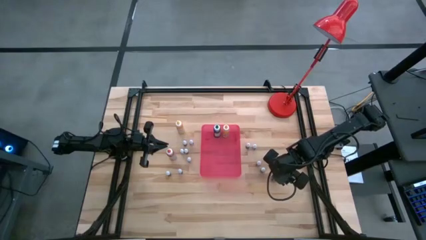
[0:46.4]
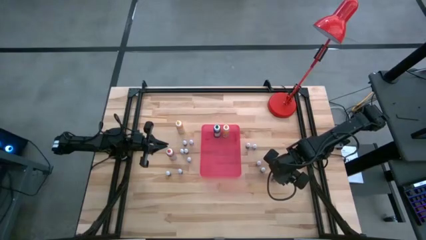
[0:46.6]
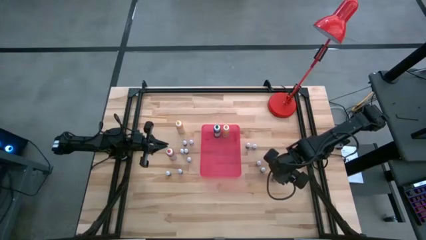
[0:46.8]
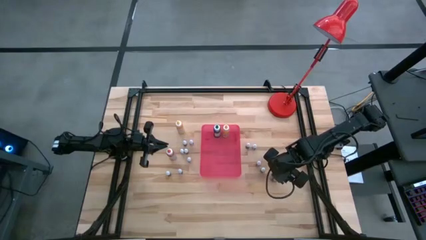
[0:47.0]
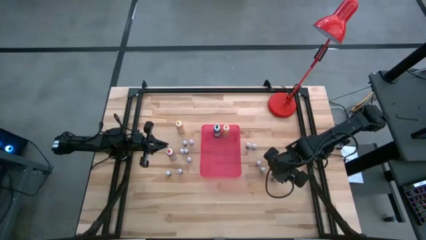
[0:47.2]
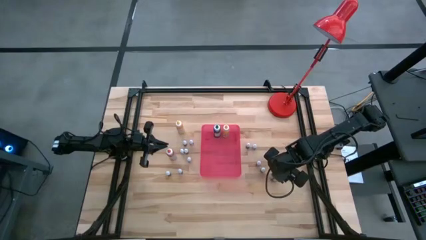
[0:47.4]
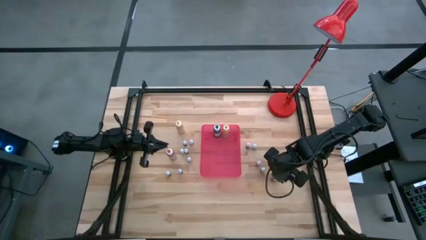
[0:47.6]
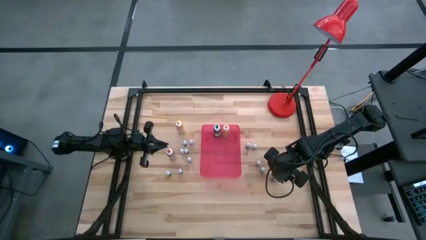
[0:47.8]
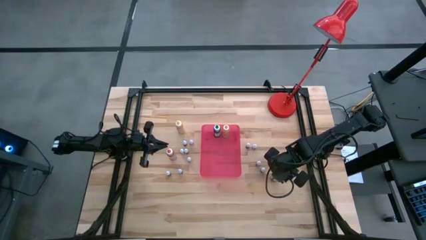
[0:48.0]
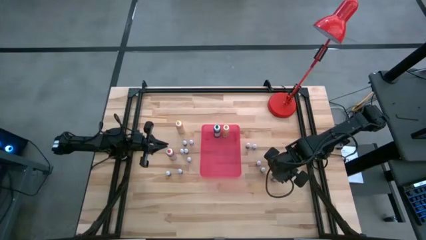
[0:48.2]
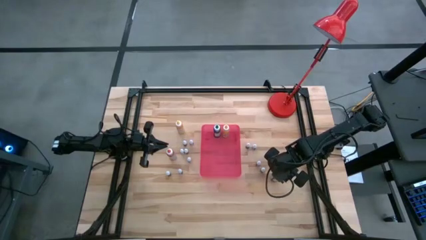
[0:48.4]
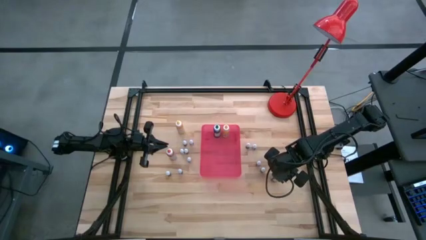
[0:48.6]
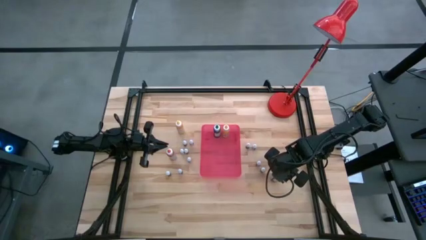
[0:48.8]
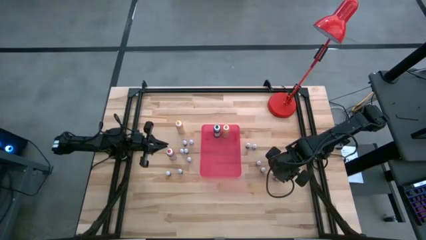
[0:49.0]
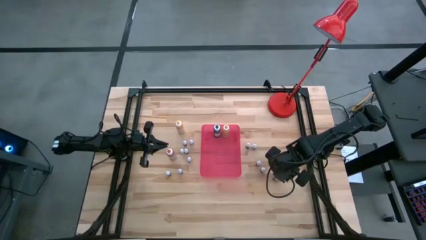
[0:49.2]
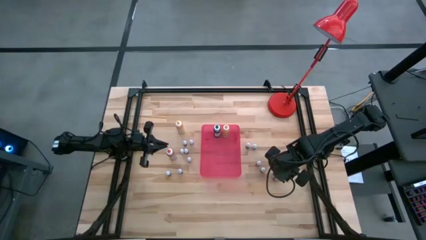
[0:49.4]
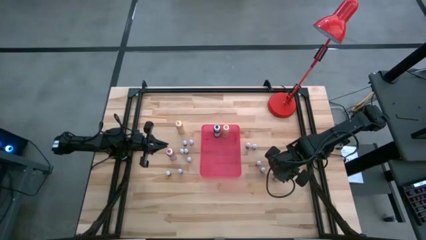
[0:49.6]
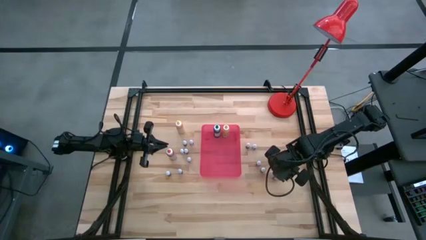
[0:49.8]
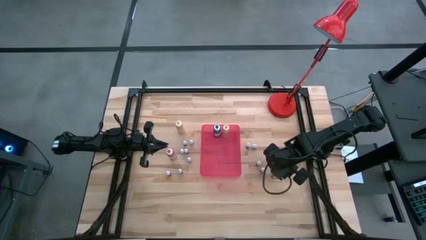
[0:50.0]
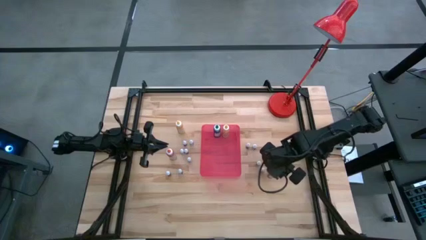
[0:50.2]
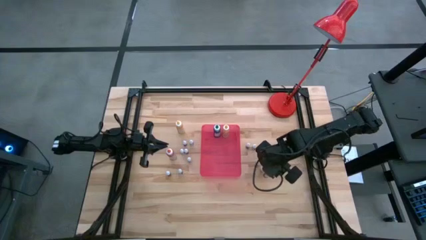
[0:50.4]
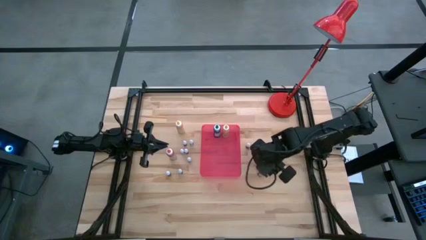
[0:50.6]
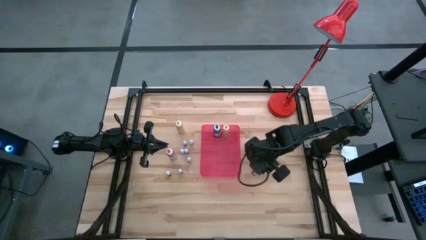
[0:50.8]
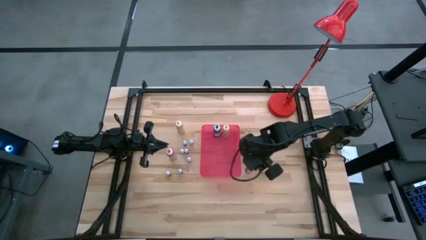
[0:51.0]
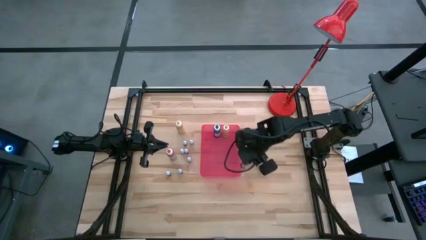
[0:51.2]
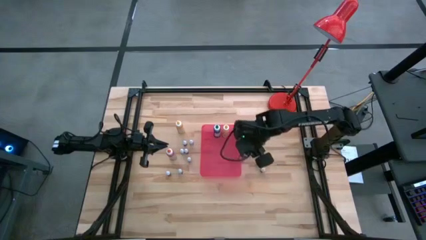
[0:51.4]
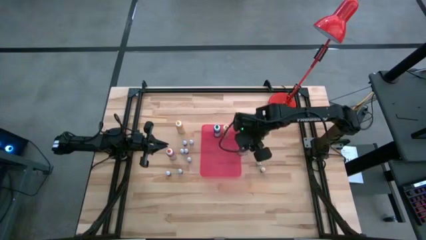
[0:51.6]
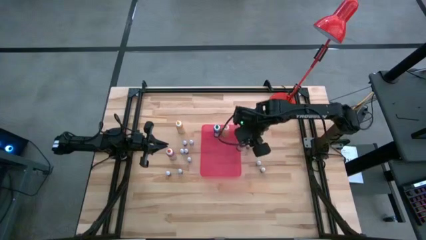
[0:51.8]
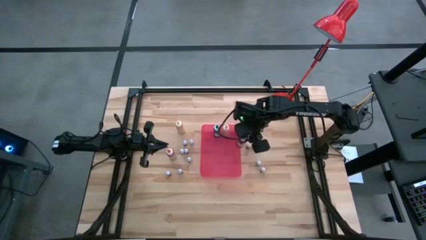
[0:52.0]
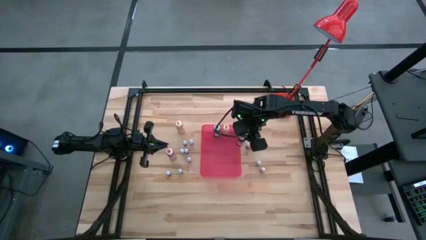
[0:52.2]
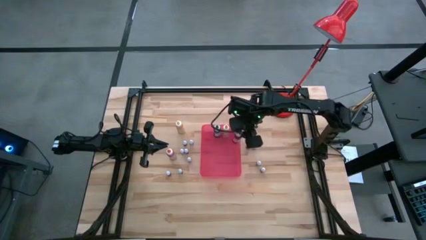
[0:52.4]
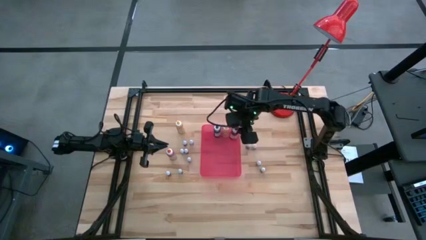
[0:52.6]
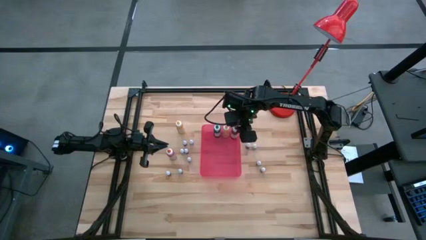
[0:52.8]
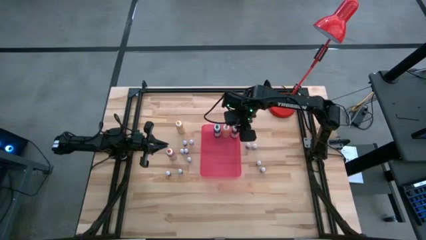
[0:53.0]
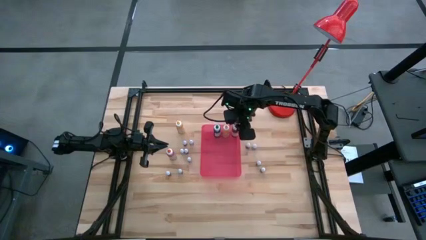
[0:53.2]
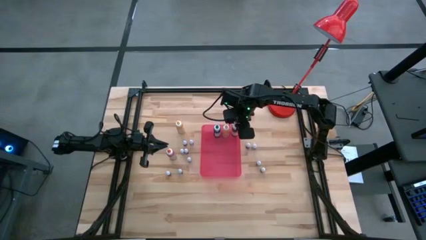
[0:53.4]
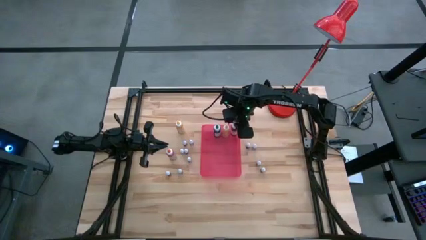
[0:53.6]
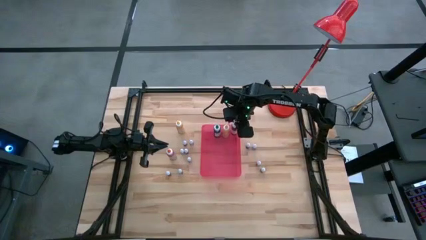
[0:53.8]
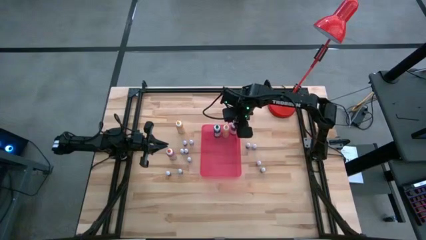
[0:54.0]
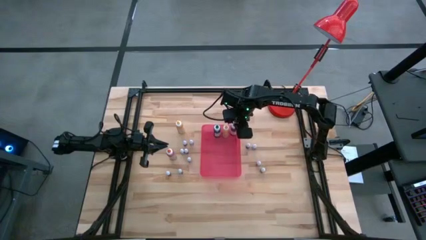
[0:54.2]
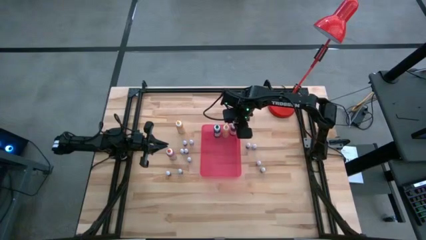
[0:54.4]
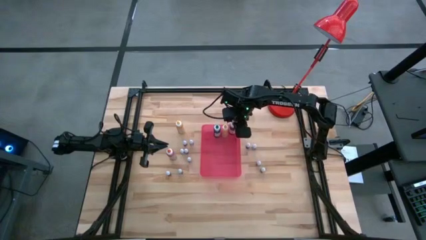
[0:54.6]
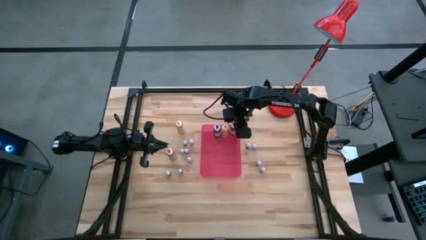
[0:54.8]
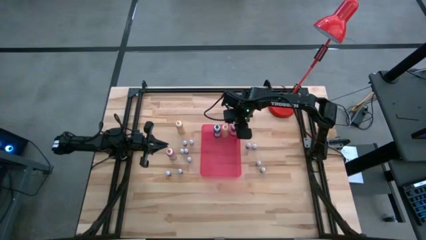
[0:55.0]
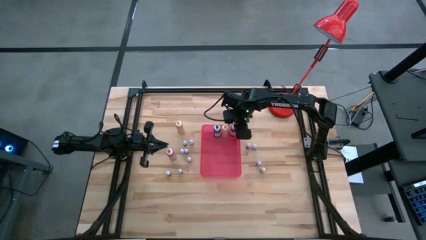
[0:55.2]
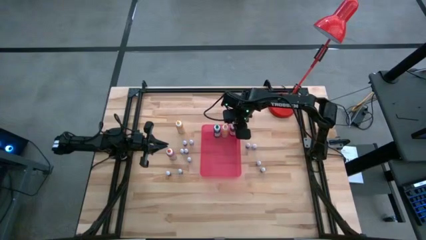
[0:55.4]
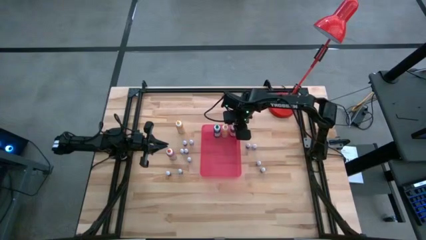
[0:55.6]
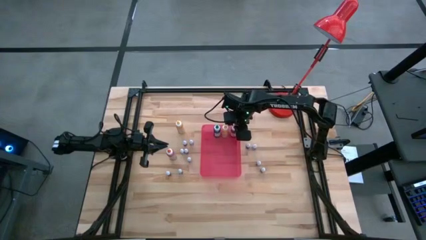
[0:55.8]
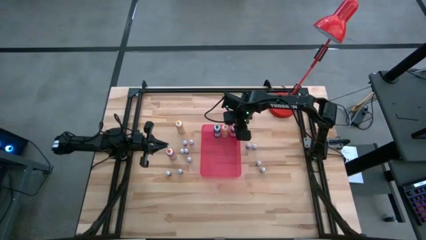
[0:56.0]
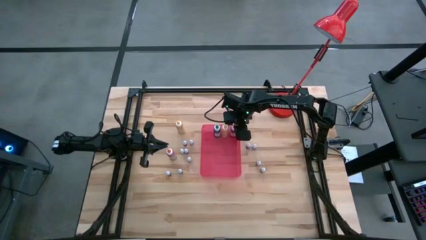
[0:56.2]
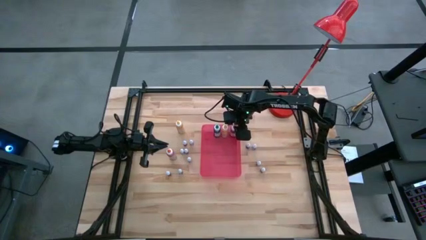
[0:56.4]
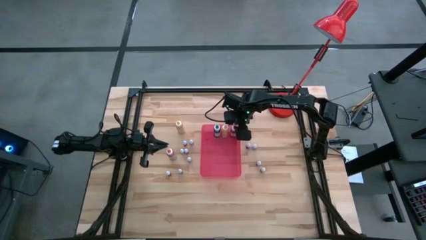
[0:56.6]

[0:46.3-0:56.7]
Task: Pick & Place food coloring
Put the large red food coloring bottle into the red bin

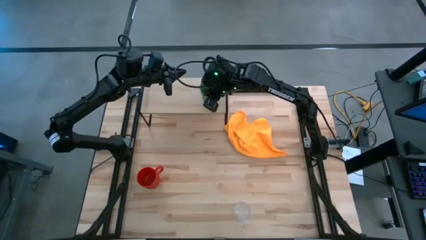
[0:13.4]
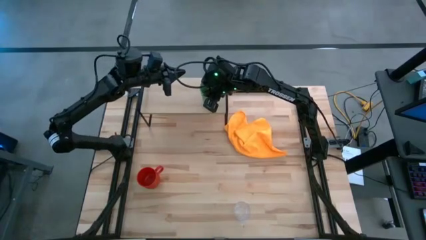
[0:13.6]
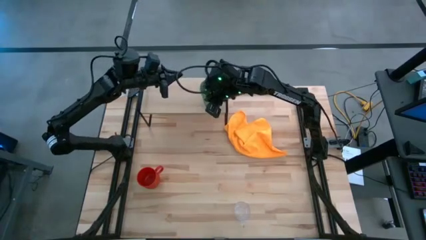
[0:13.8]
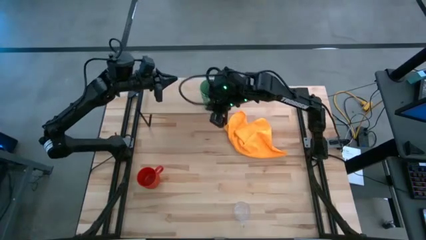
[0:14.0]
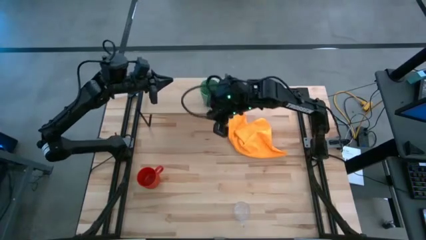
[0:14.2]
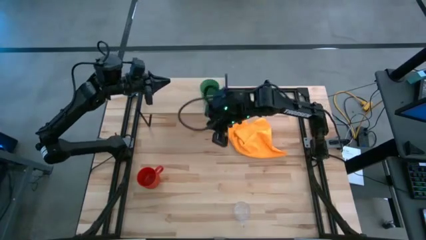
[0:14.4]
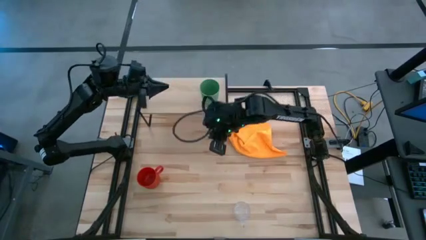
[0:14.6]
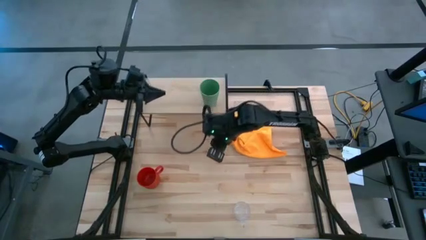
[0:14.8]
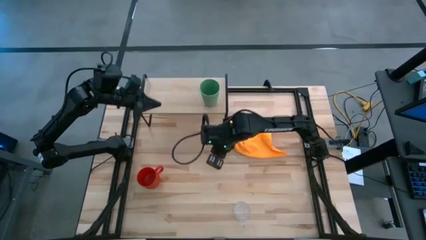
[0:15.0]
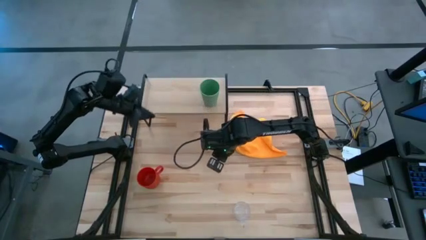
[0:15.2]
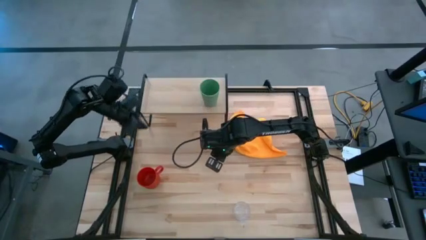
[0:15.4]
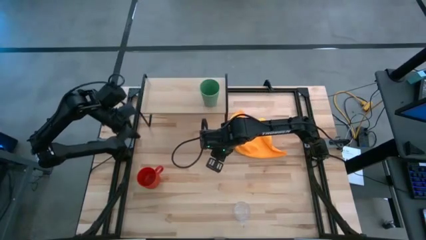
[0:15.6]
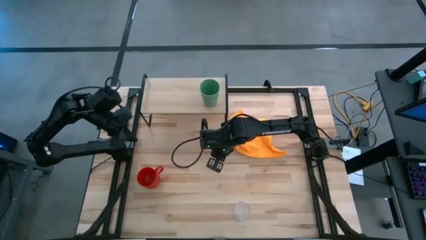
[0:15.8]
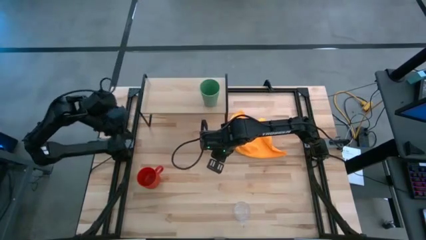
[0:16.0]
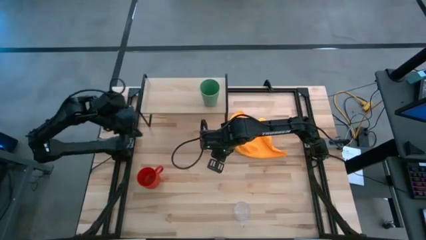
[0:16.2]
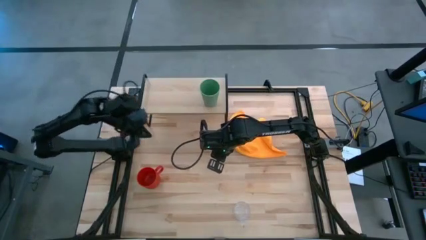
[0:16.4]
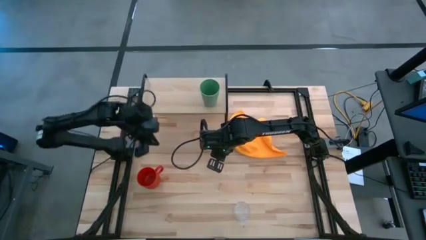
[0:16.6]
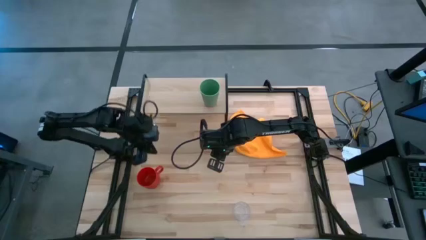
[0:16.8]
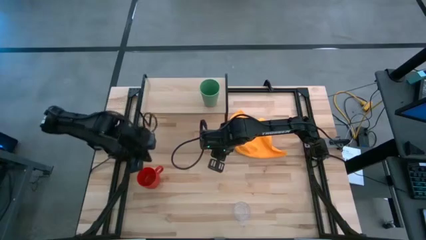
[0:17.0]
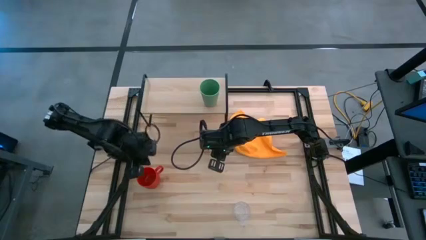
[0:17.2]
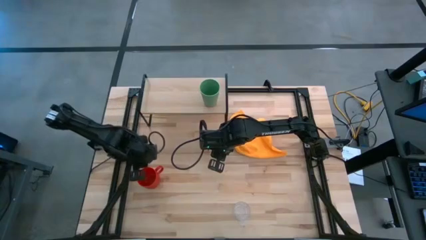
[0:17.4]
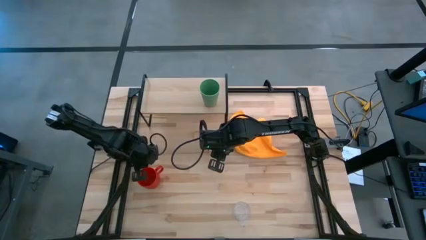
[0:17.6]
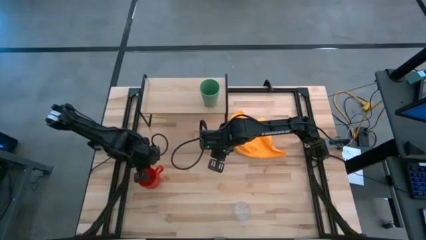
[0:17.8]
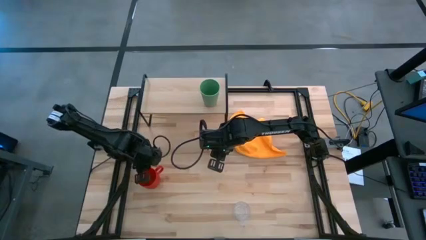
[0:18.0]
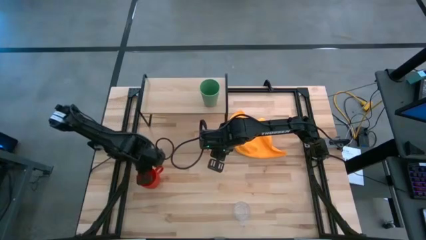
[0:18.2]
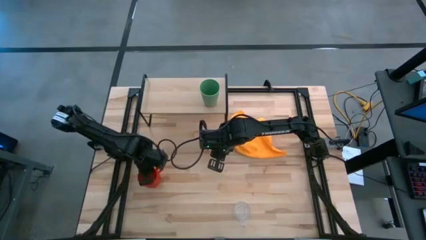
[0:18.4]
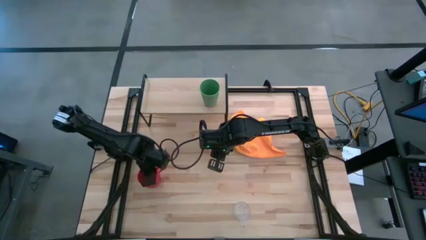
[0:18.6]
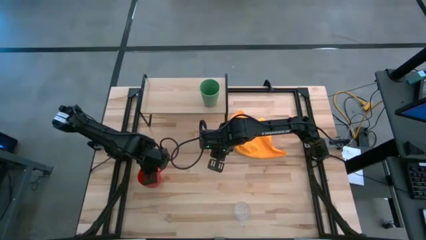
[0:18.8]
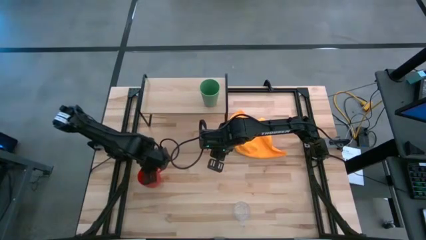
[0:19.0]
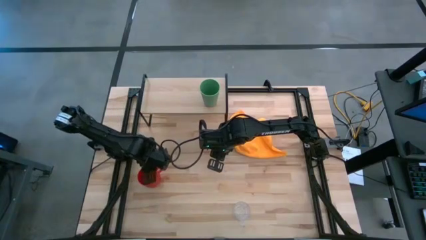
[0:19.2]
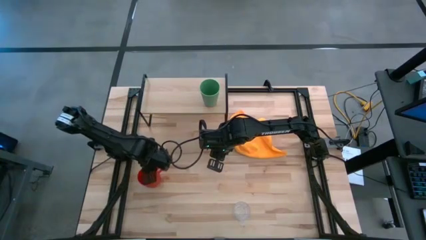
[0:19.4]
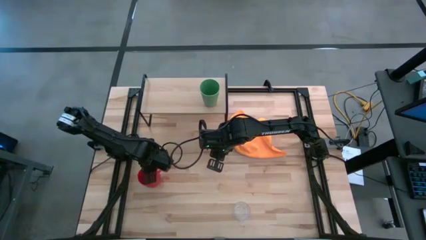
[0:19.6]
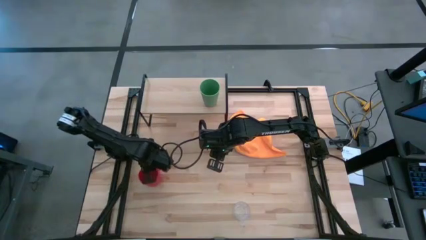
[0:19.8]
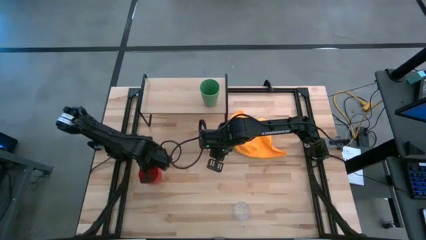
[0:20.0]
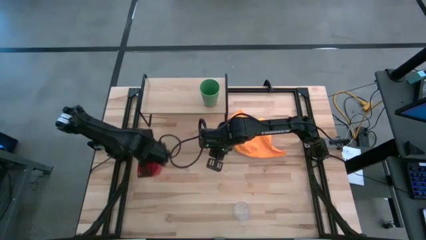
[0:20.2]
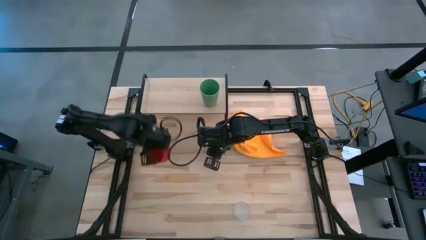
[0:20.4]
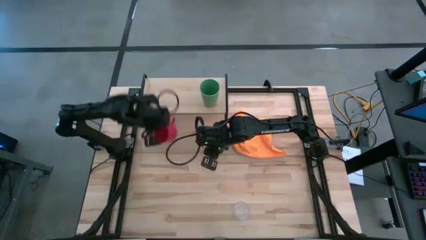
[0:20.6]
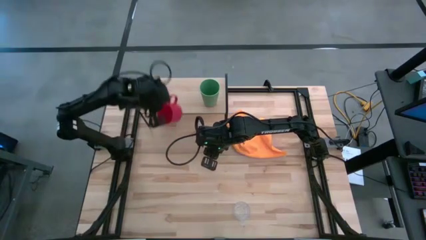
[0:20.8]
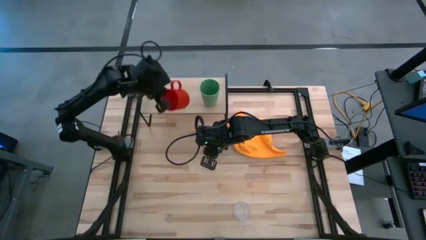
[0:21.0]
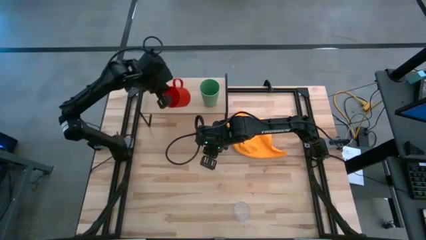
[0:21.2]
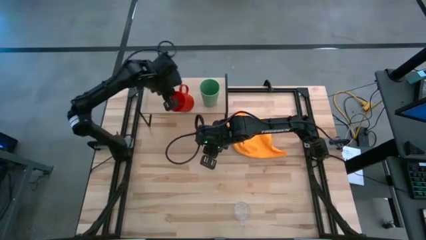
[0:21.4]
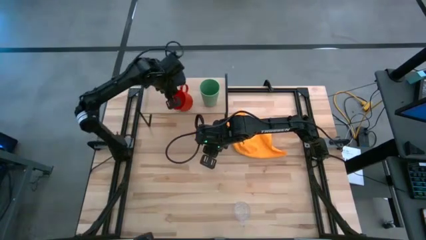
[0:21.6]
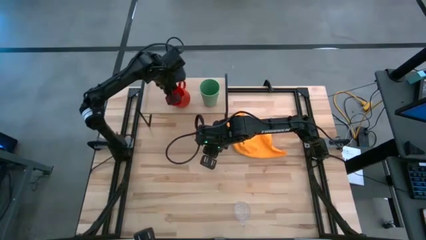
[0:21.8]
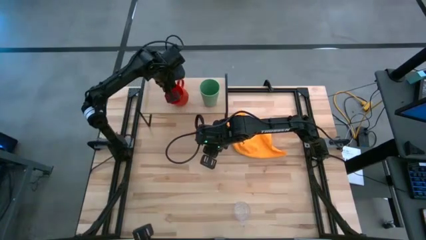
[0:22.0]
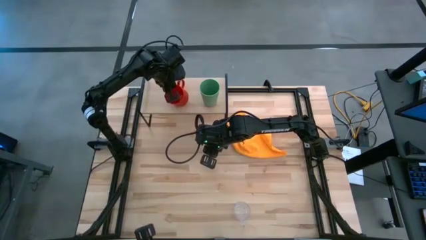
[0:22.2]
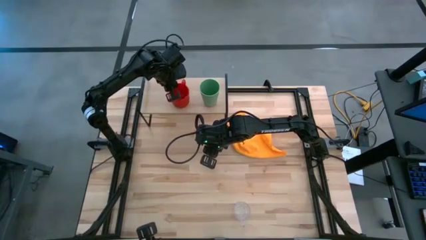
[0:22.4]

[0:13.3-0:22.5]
Task: Stack small to large cups/mugs on shelf
Put the red mug on the shelf
